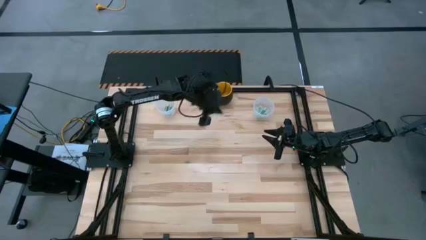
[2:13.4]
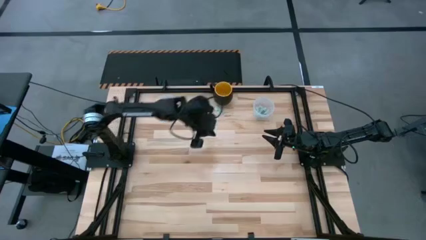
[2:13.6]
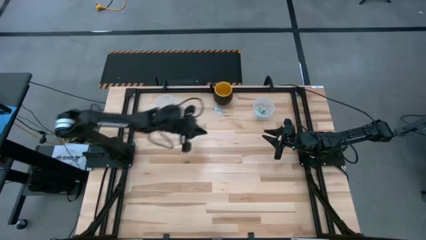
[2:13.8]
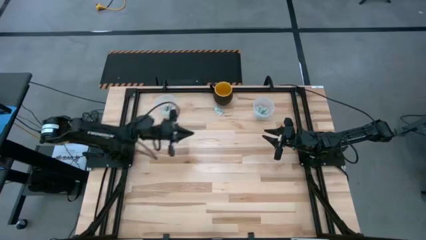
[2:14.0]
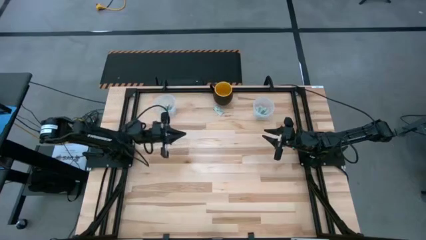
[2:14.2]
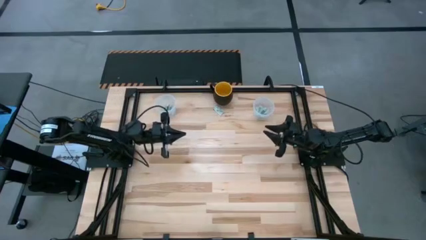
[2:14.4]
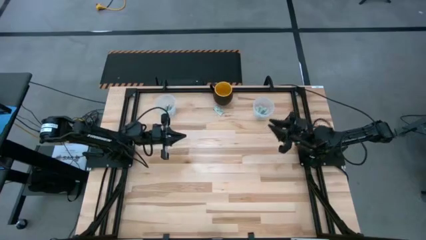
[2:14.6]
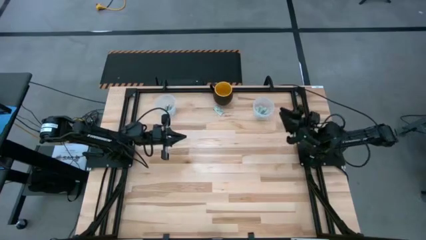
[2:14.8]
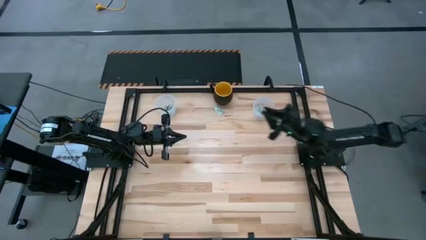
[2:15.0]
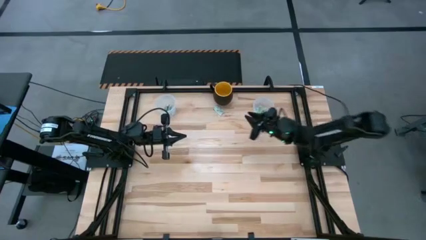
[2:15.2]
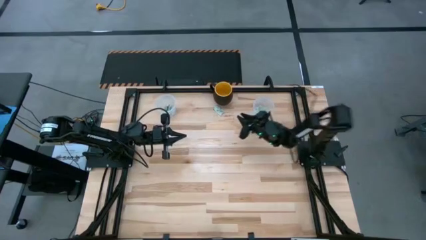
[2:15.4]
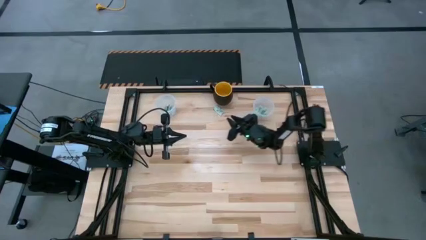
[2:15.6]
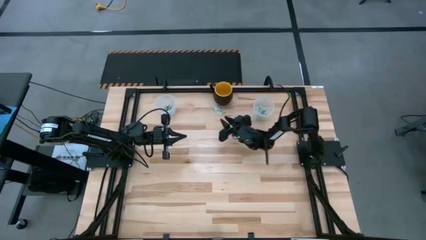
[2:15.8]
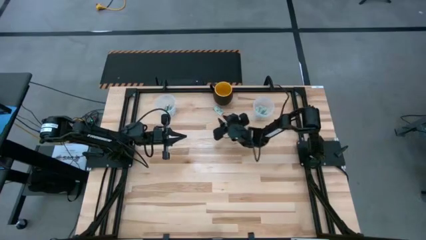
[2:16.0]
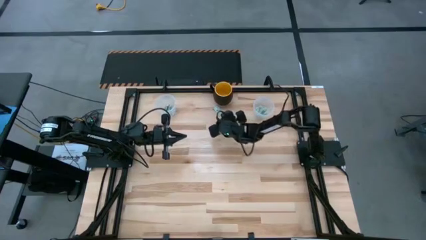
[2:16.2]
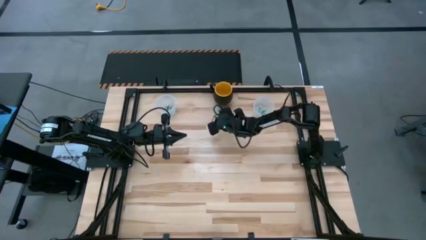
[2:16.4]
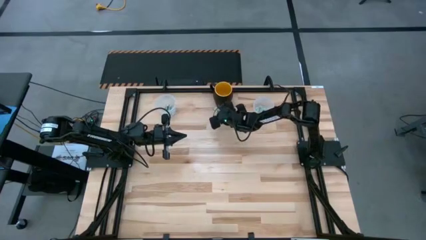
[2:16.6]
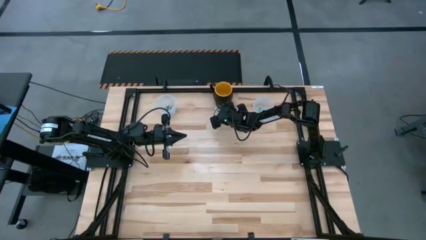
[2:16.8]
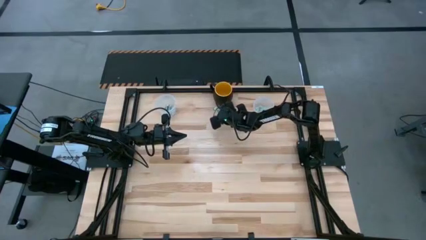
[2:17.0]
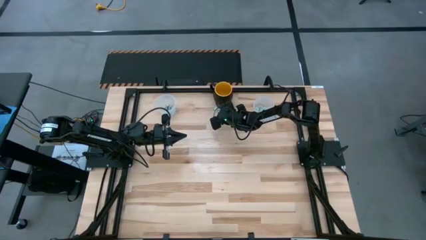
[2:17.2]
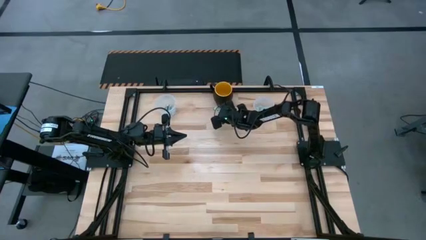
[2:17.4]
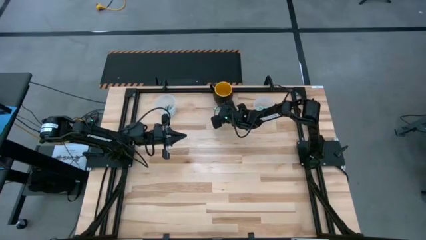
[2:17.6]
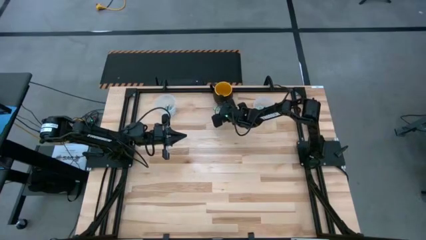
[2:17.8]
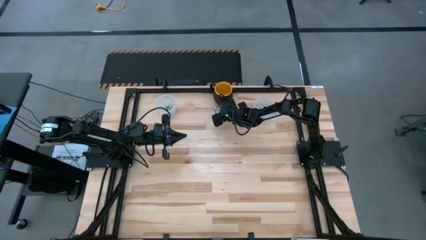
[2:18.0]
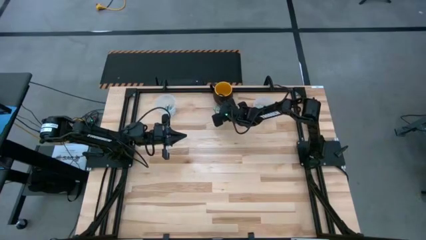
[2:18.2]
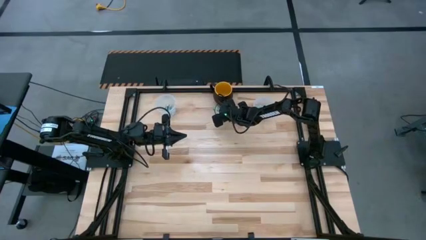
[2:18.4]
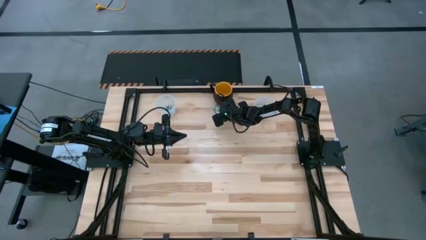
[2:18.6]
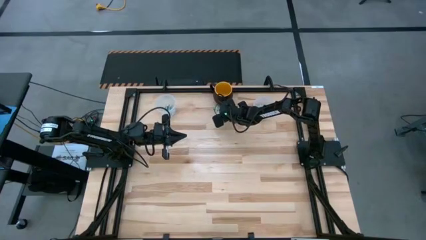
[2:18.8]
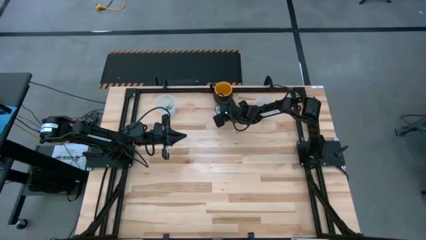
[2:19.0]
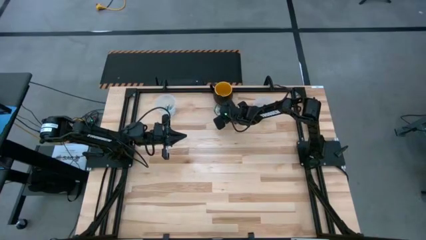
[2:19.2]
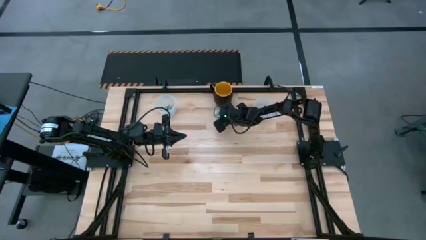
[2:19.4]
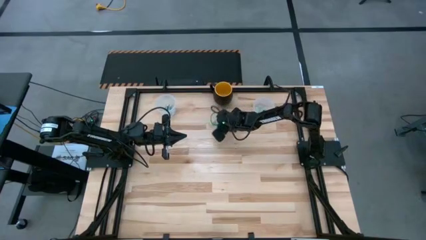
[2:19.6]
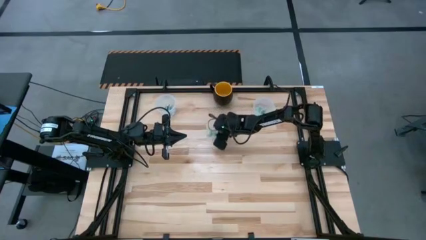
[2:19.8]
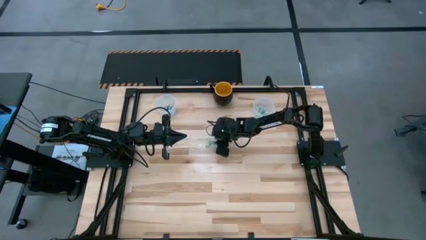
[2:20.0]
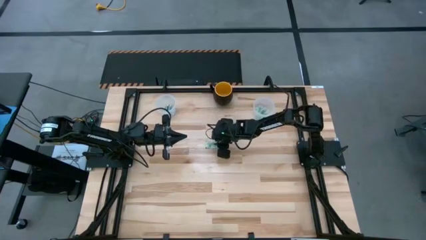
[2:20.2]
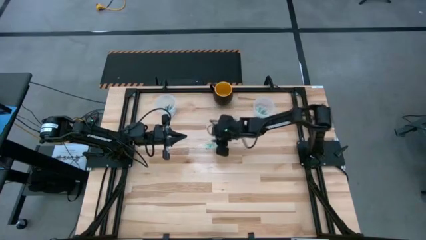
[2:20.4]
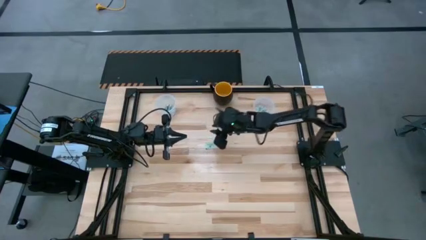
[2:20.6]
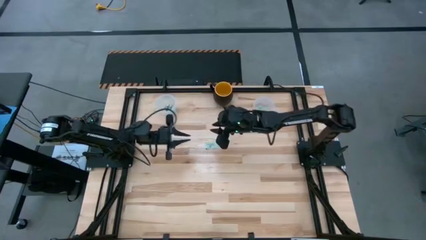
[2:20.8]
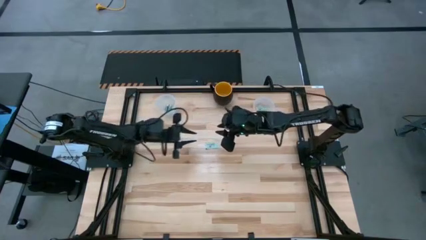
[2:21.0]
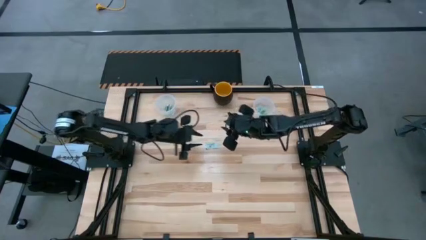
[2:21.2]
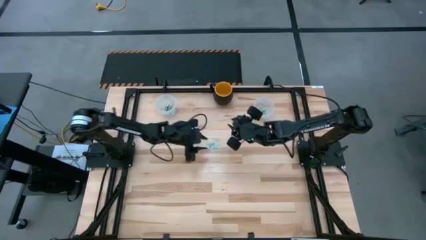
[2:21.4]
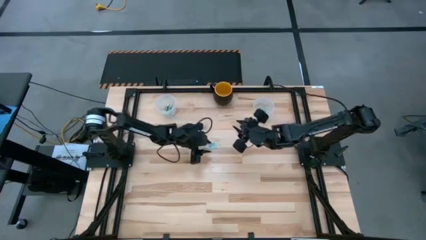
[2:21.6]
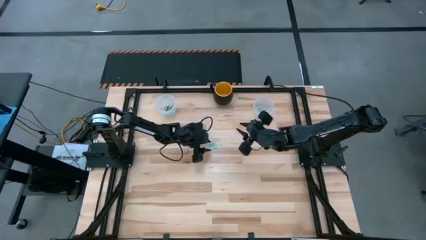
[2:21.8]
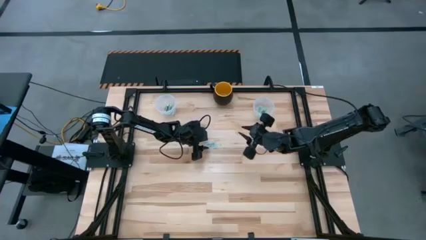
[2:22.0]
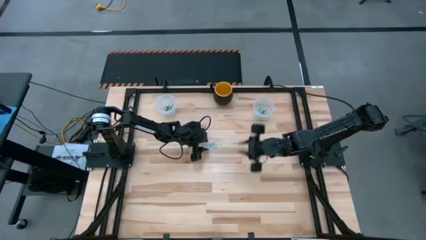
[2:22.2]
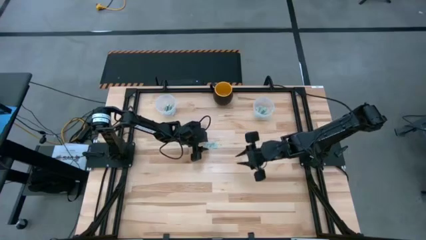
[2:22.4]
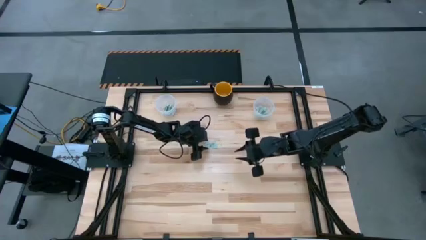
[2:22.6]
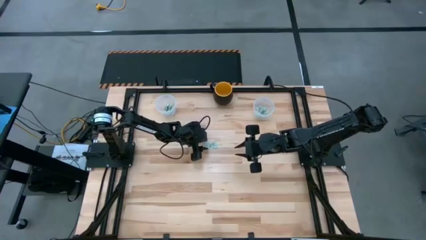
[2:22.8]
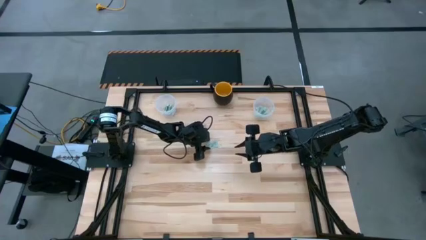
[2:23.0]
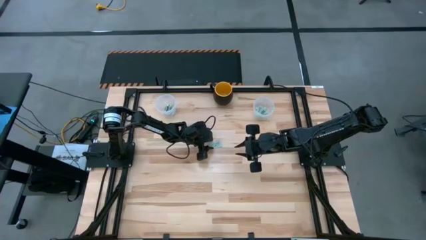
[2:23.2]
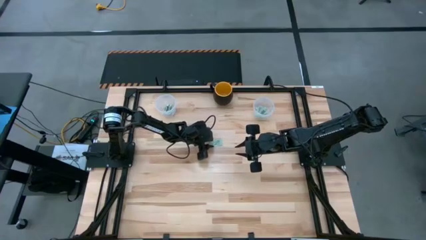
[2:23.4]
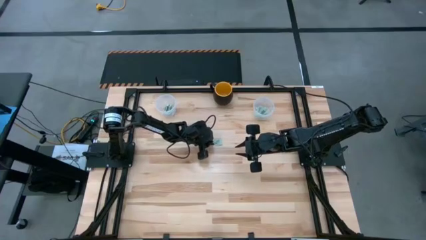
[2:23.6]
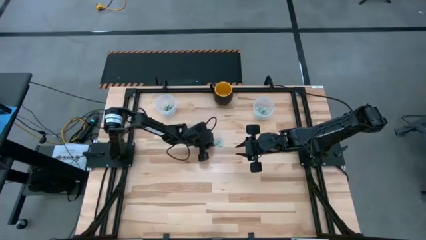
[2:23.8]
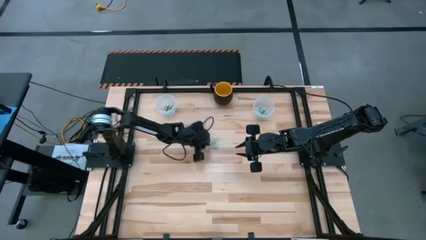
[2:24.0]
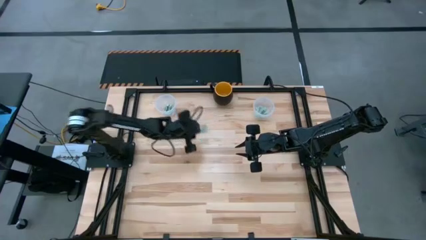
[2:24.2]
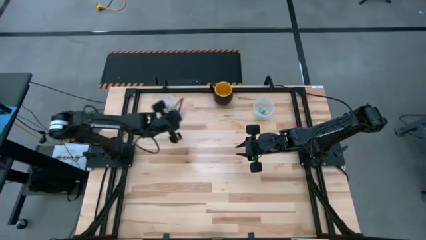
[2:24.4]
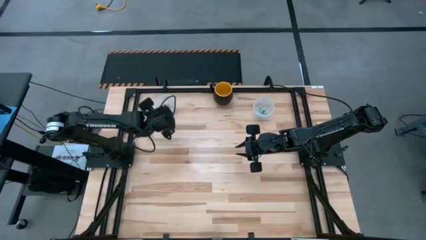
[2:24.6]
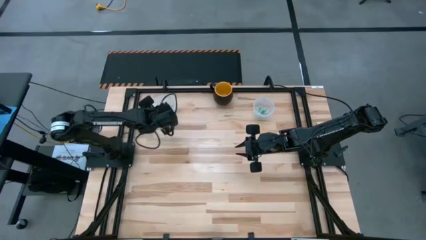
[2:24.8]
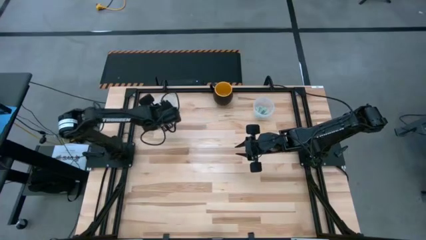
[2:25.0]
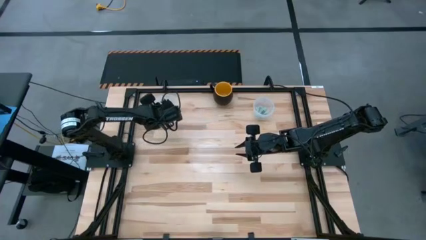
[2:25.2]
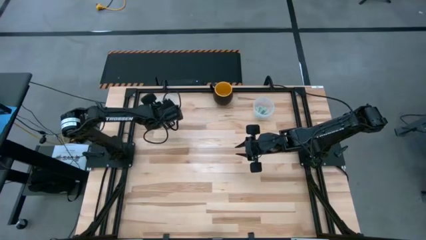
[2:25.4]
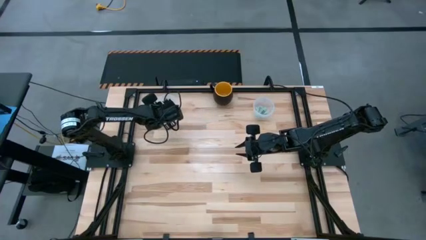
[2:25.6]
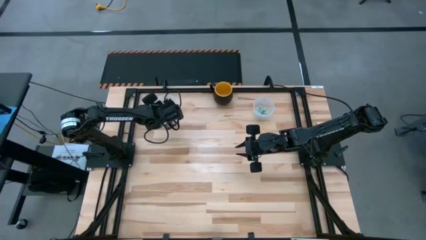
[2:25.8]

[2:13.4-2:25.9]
Task: Pick and place Stevia / Truvia into bins
Put the stevia packet into the left transparent container
